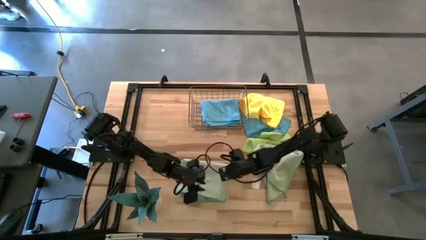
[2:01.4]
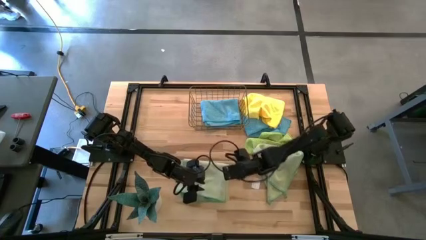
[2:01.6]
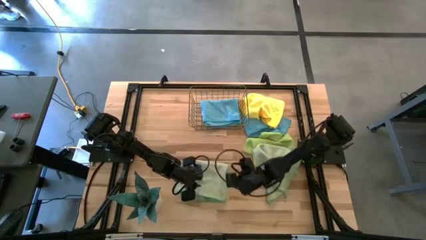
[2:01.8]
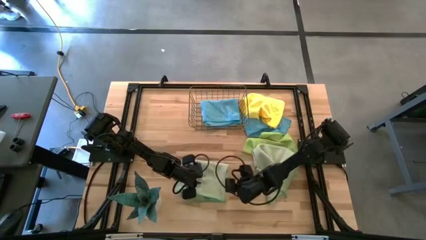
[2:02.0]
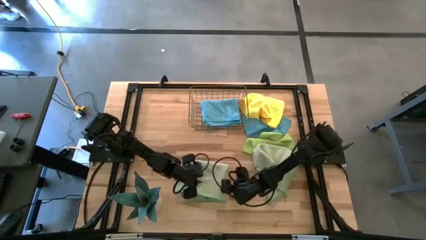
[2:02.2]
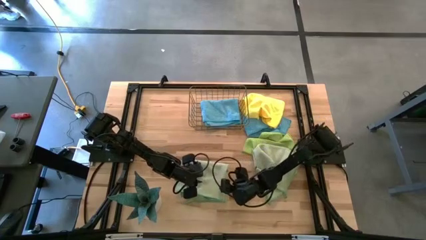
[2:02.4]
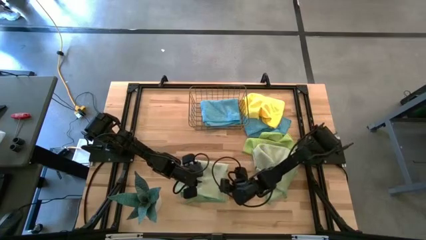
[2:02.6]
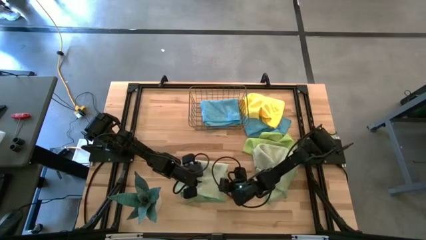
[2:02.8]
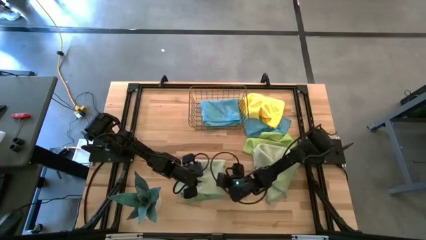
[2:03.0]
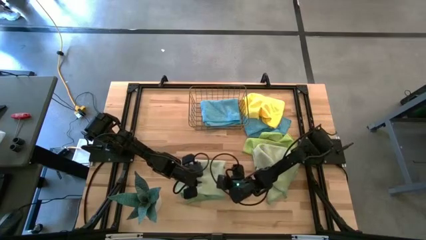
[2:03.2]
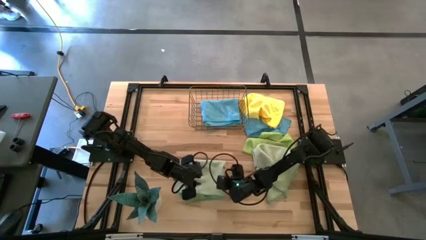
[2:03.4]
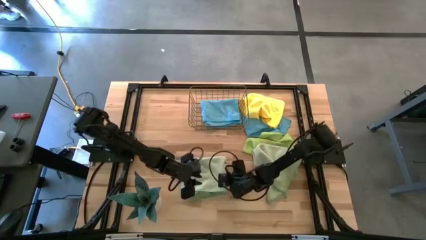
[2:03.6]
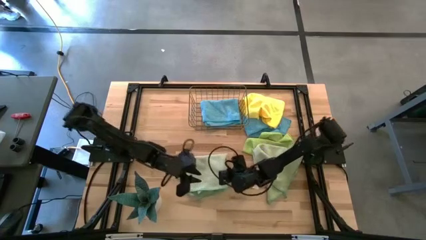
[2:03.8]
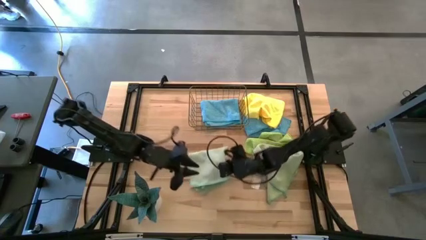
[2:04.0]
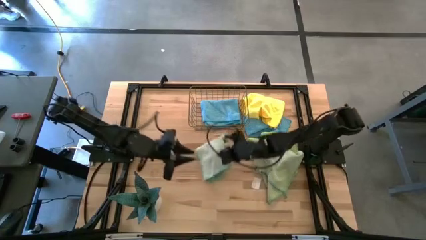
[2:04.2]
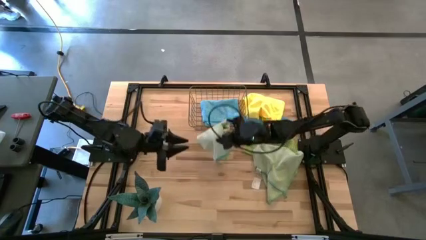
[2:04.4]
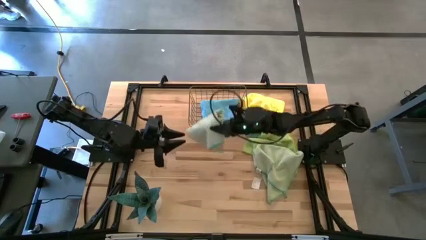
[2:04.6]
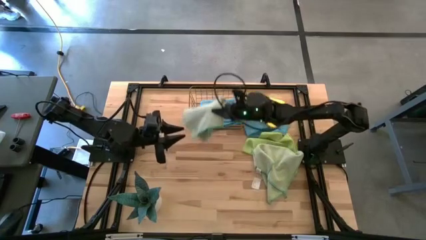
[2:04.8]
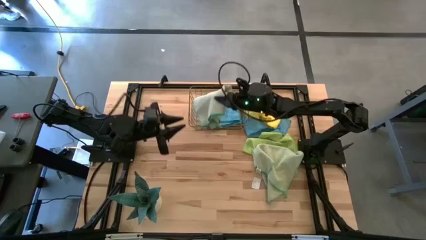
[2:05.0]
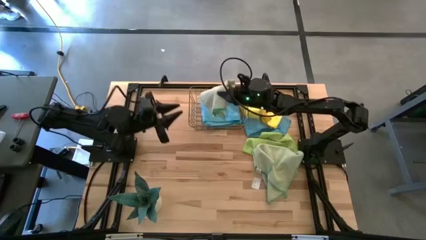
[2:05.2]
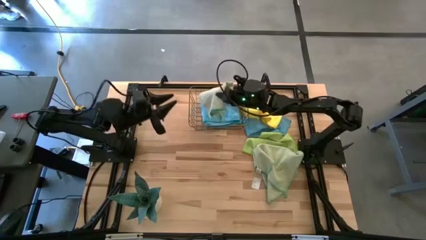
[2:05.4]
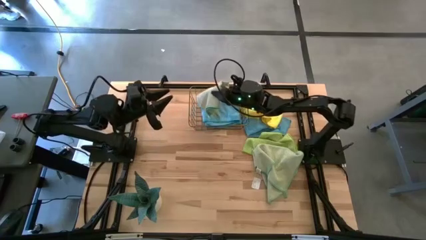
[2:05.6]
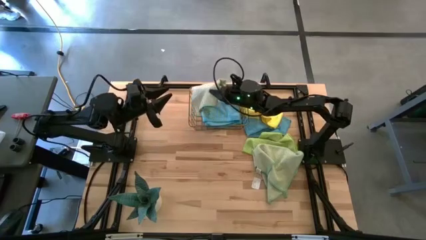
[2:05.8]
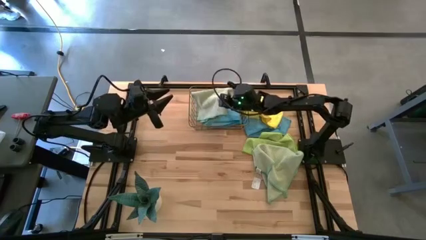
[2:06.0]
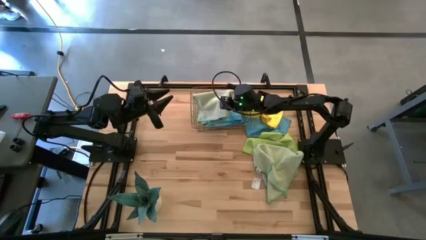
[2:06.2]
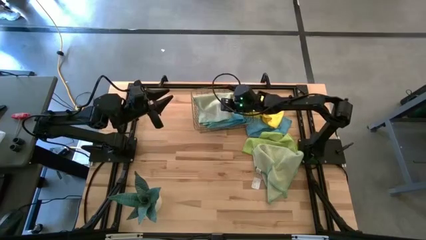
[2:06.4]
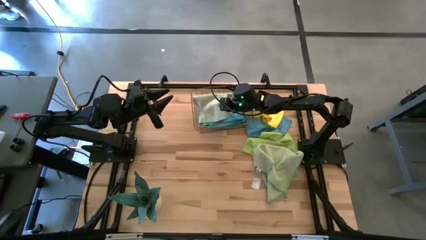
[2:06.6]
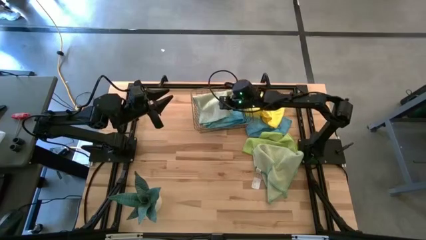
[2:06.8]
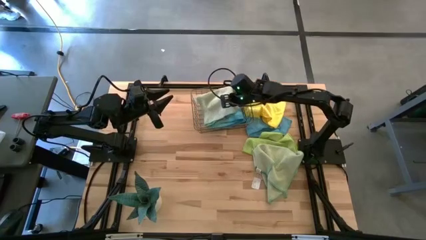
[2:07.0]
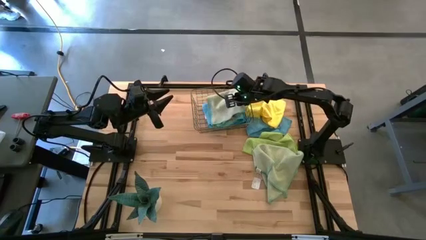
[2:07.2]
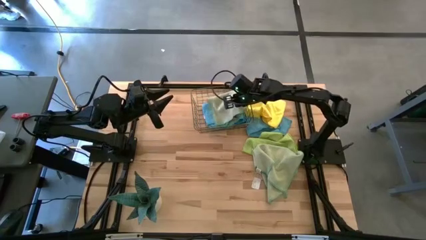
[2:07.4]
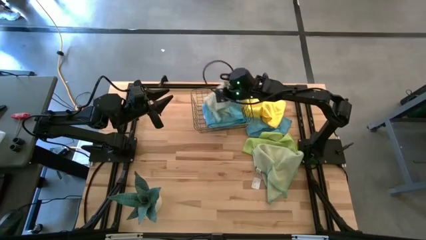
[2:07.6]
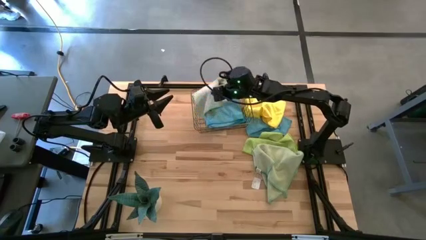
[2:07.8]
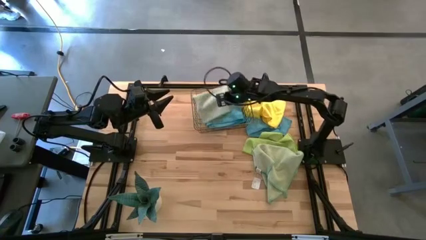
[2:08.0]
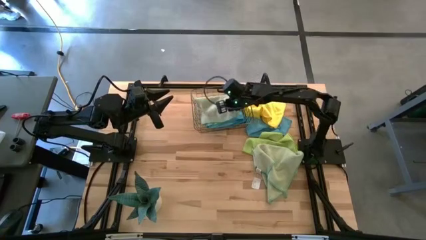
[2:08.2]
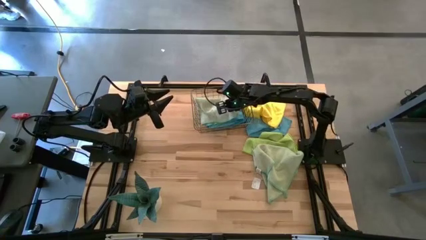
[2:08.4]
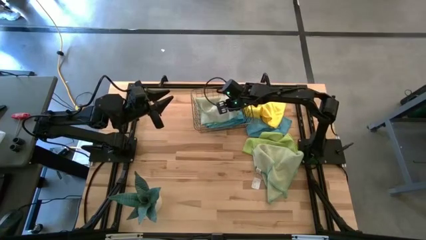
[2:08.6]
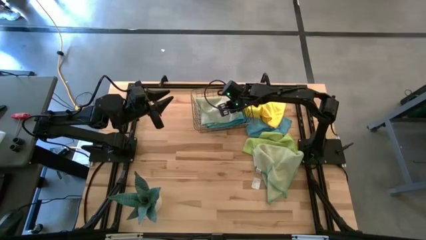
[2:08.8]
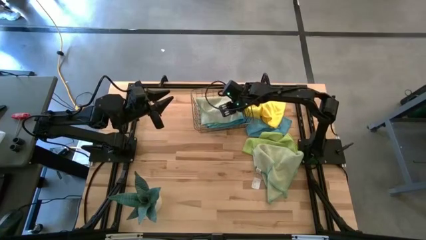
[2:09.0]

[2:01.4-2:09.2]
Task: Fold microfiber towels
Stack the left light green towel on top of the blue towel in the wire basket

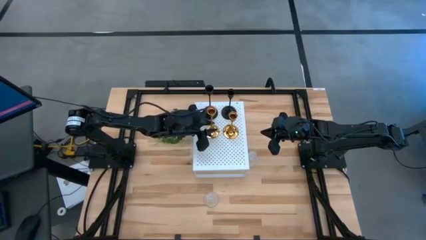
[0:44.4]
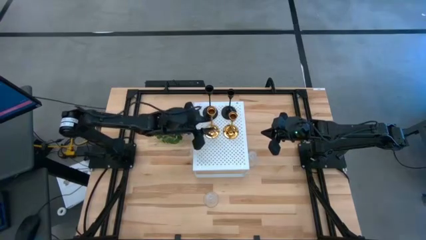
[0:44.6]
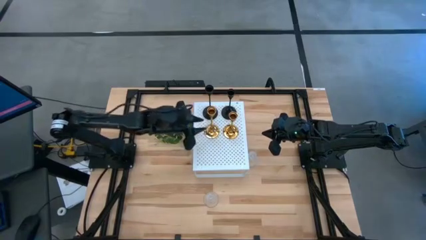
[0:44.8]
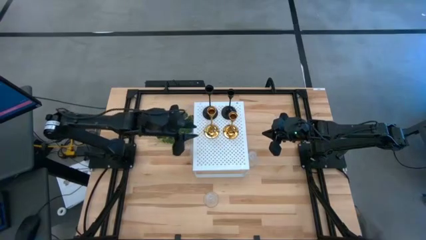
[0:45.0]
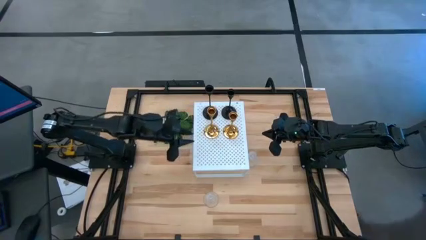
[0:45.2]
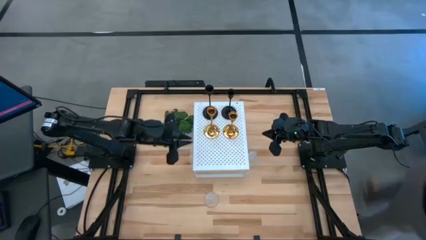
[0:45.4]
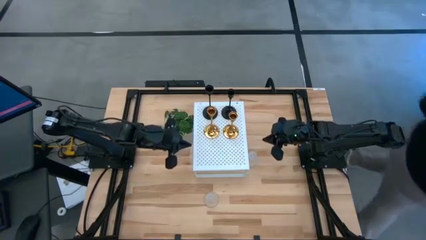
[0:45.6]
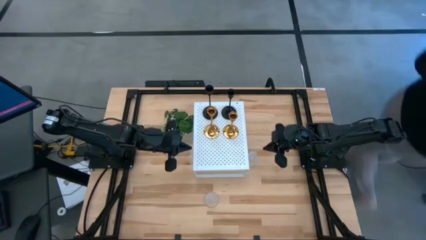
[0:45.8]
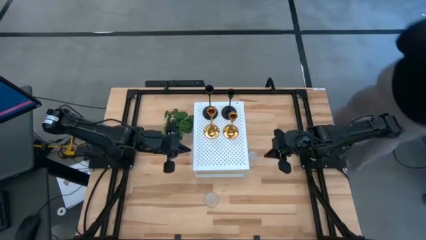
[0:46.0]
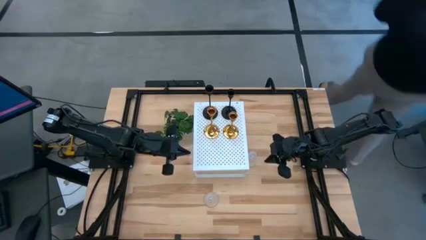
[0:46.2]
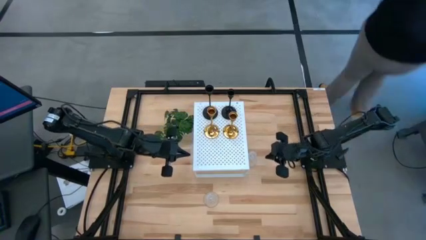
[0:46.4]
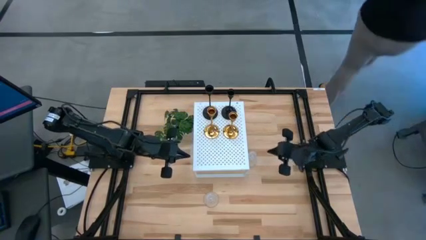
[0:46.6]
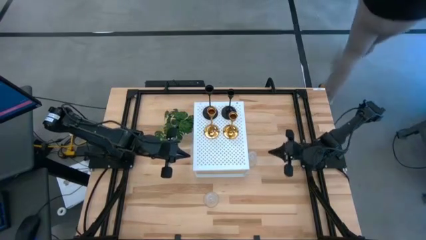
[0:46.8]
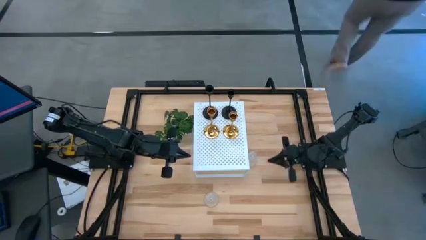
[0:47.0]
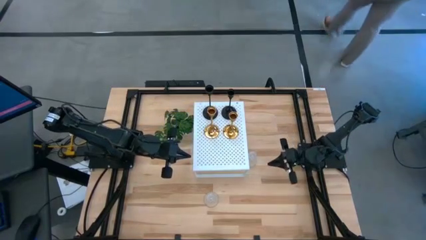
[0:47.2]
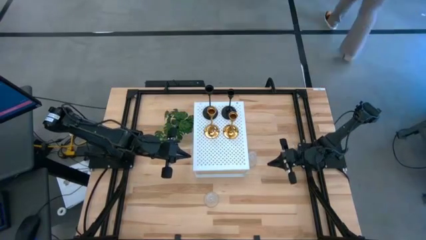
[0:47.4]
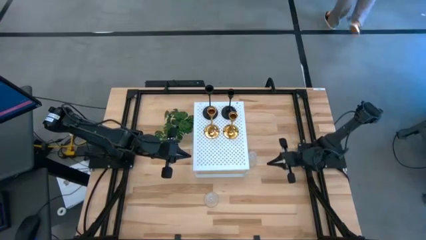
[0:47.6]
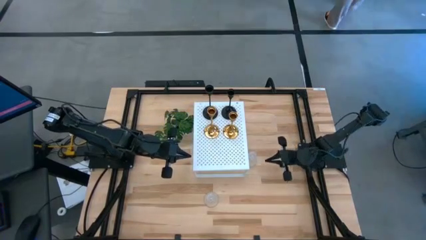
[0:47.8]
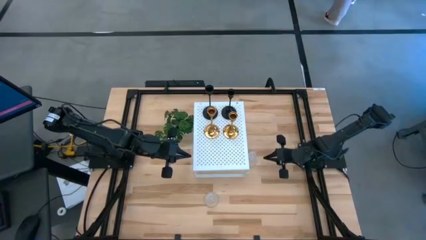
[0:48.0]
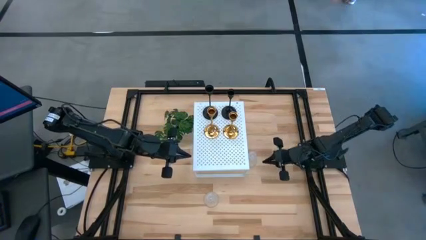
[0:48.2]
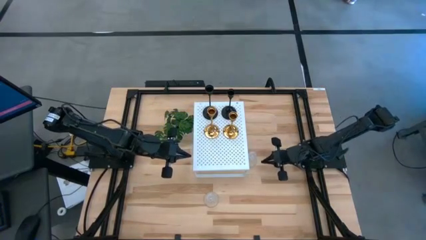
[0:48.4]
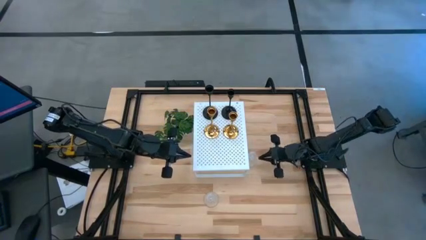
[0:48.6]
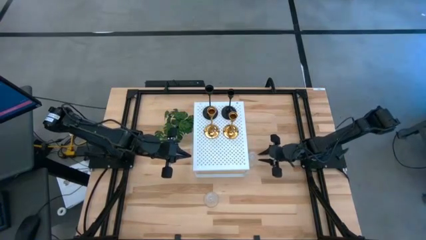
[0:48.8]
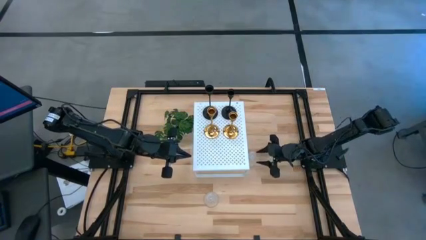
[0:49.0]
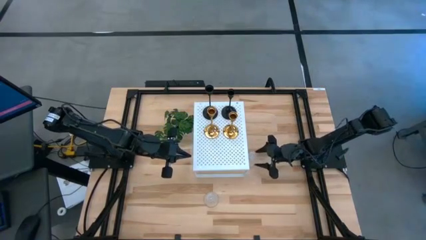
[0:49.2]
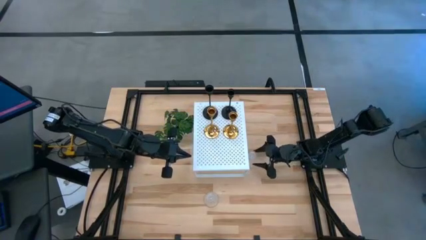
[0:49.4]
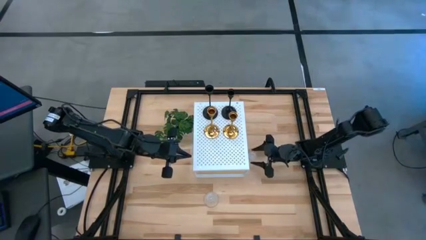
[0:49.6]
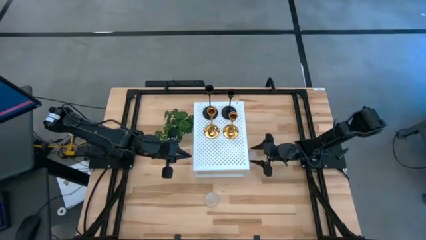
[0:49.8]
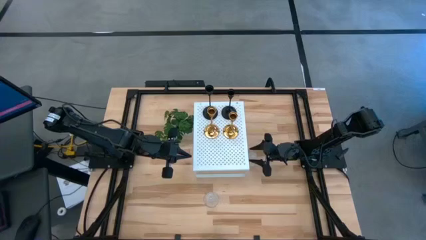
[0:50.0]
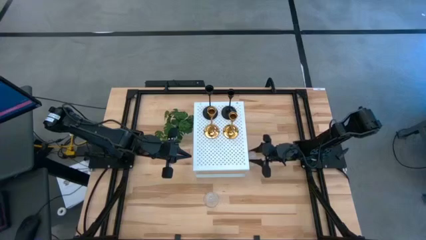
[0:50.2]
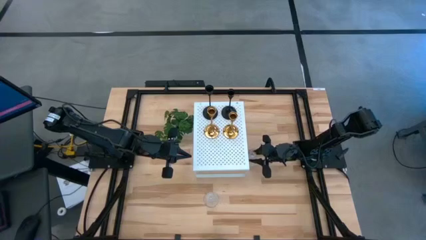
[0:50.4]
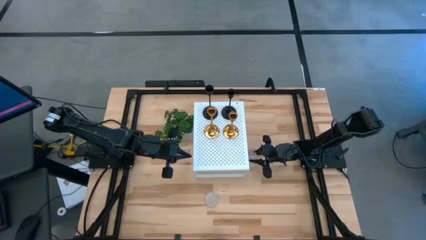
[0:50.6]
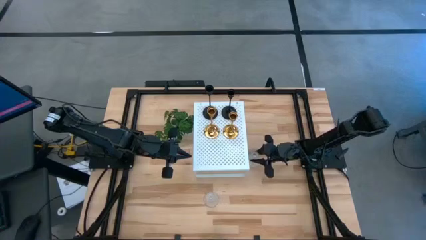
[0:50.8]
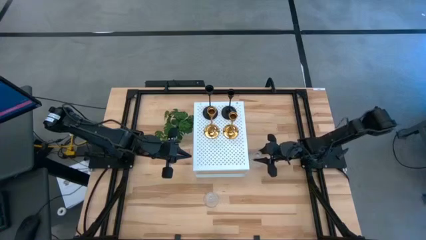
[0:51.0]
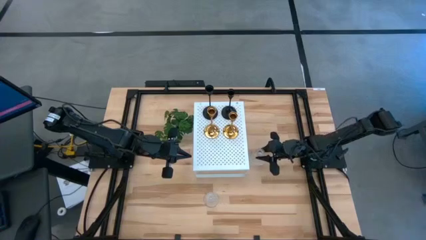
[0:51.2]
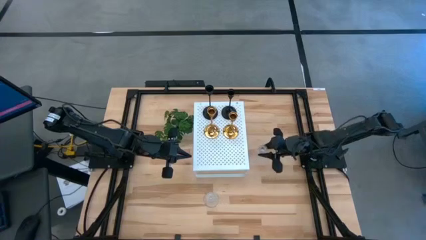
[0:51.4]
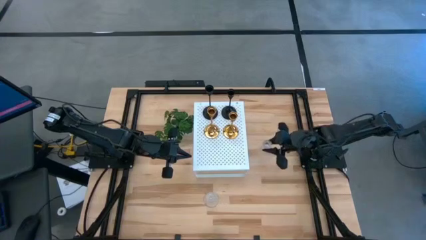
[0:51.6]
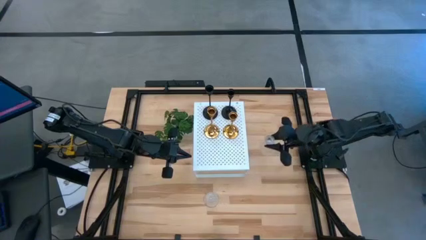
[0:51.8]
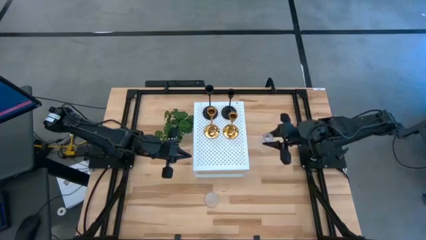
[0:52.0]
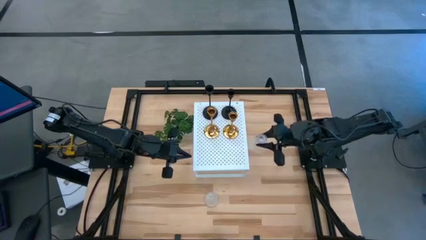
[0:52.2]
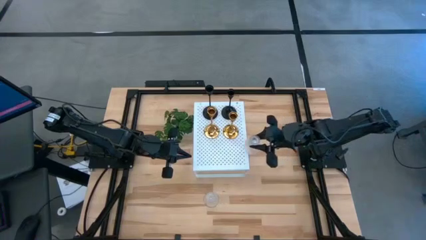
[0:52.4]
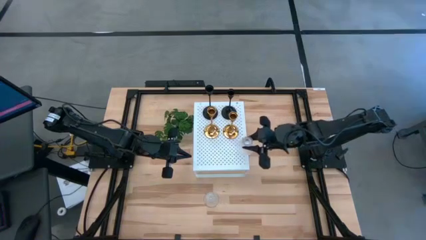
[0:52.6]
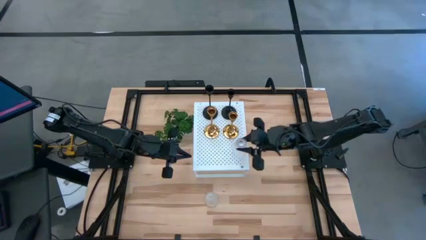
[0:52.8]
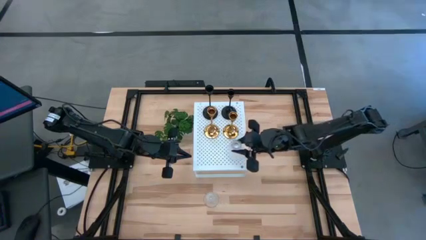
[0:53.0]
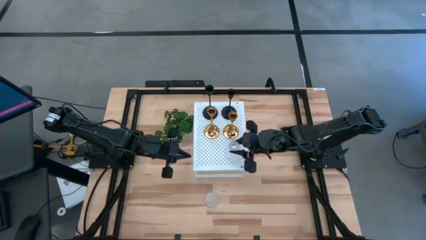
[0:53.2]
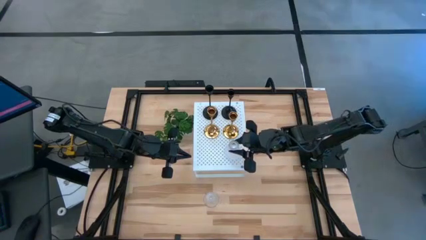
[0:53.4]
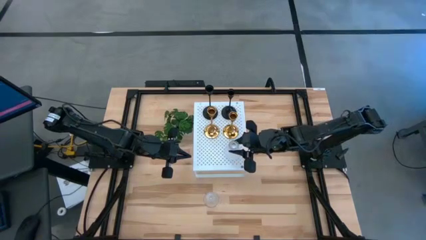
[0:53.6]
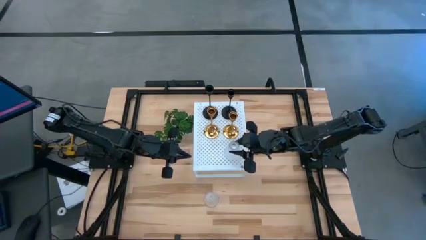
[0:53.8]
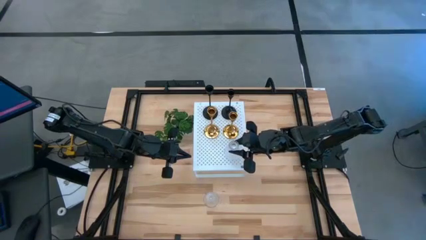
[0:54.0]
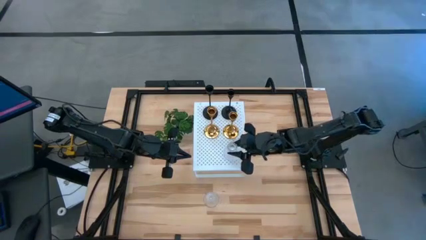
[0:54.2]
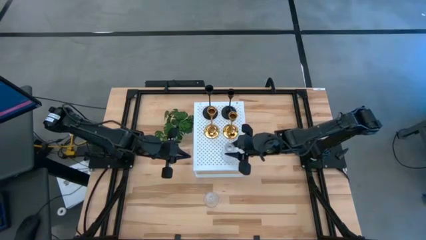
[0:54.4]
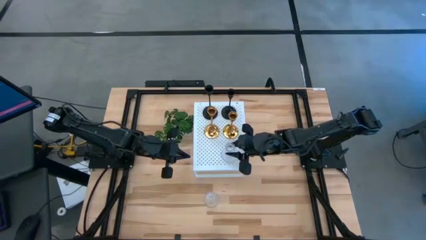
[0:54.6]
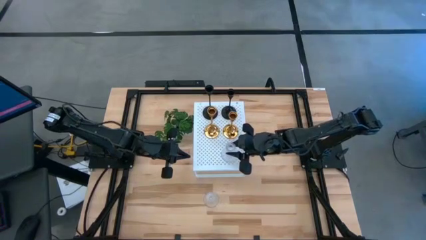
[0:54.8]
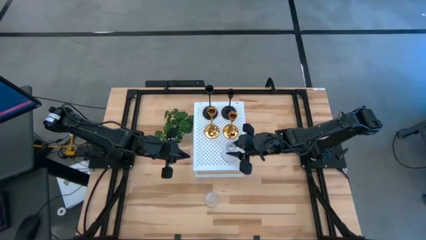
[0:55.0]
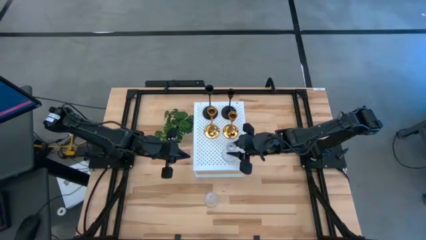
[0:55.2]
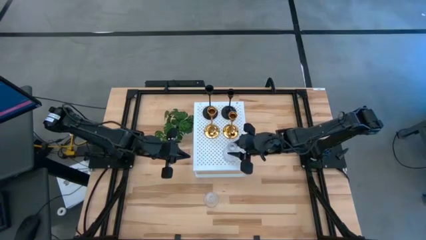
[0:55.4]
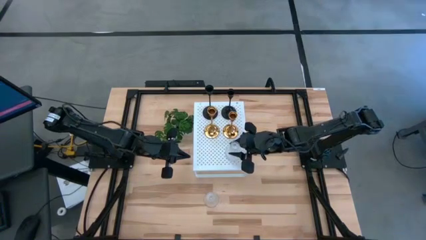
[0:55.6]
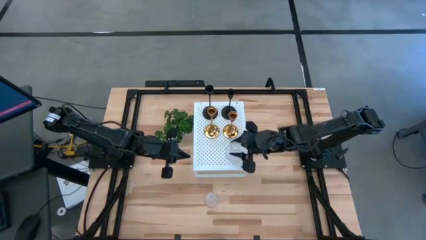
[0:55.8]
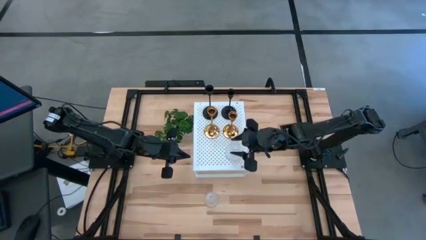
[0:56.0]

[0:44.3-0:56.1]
Task: Pick & Place candle stick holders
Put the top transparent glass candle holder on the shelf
